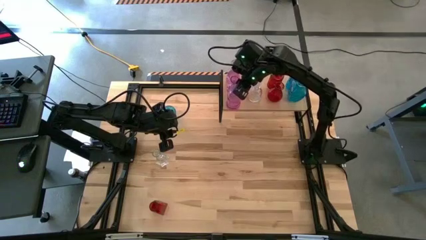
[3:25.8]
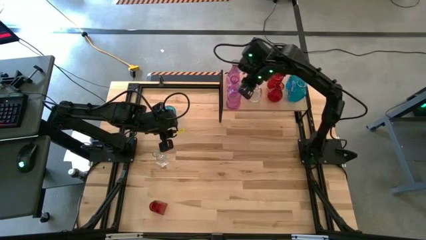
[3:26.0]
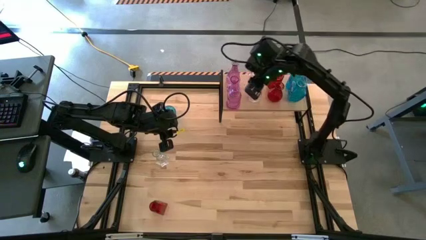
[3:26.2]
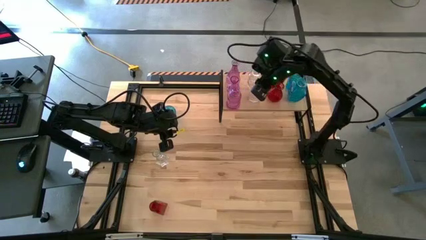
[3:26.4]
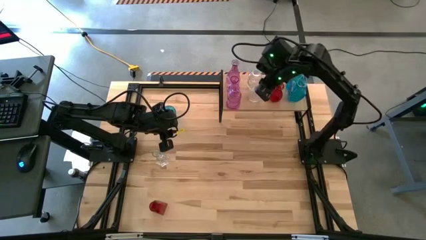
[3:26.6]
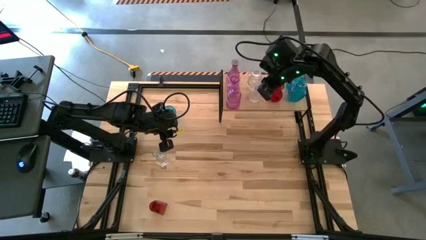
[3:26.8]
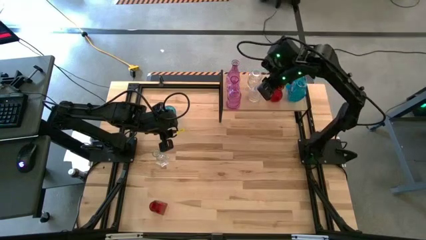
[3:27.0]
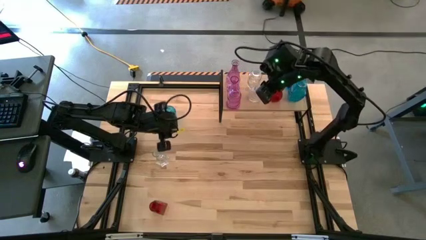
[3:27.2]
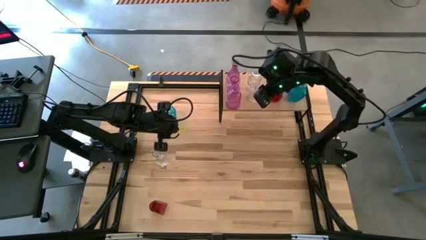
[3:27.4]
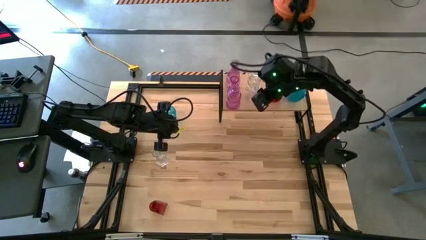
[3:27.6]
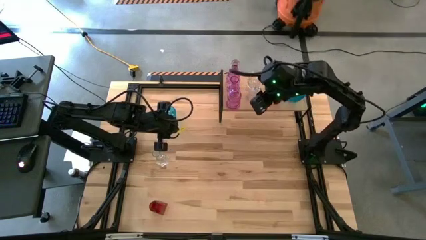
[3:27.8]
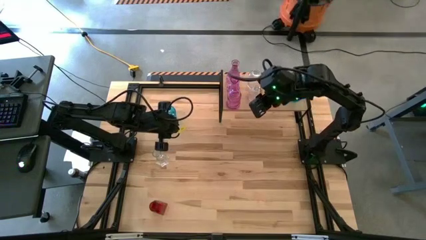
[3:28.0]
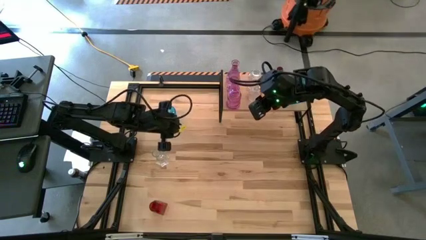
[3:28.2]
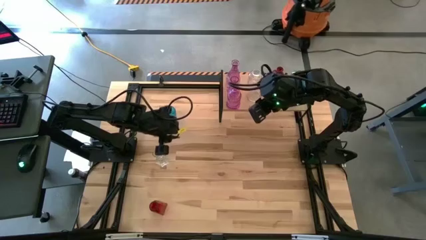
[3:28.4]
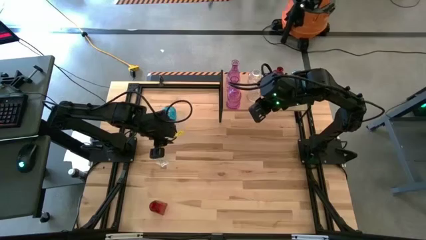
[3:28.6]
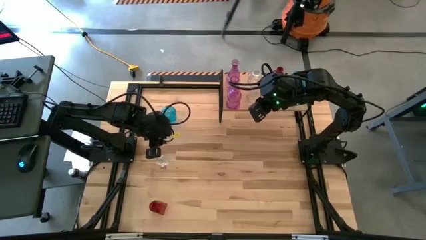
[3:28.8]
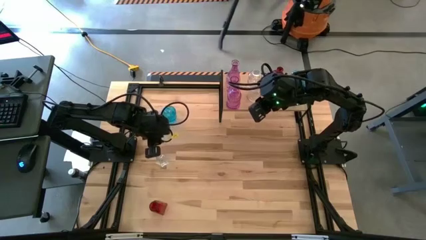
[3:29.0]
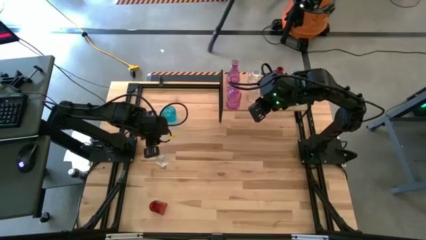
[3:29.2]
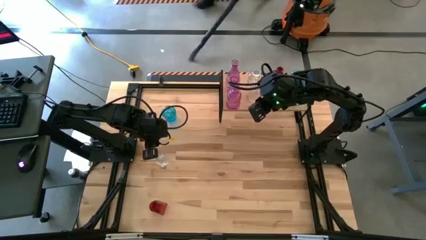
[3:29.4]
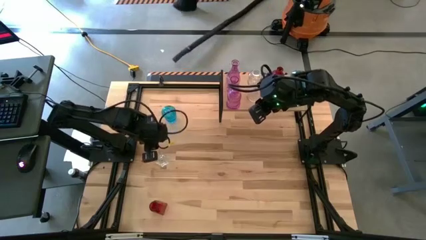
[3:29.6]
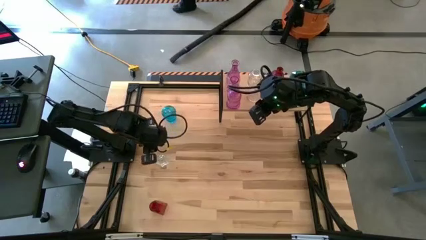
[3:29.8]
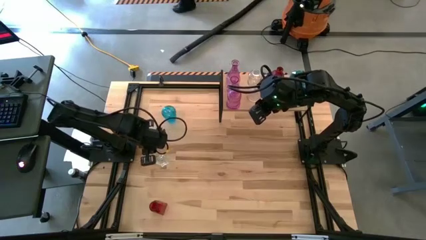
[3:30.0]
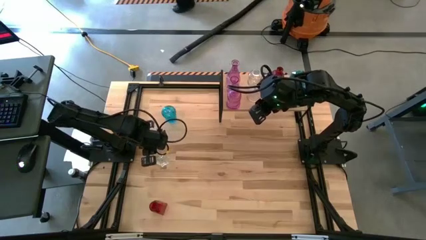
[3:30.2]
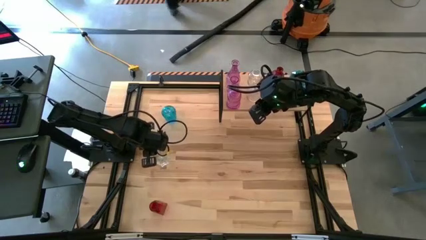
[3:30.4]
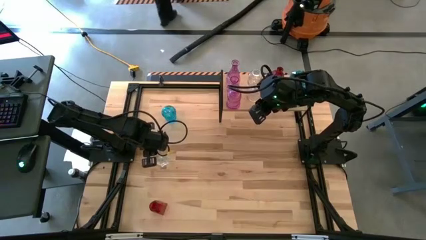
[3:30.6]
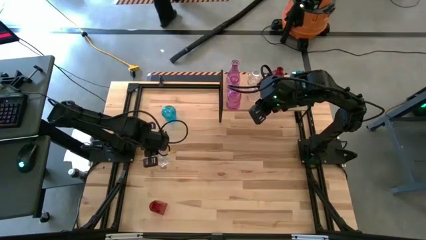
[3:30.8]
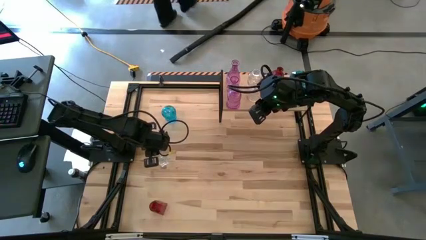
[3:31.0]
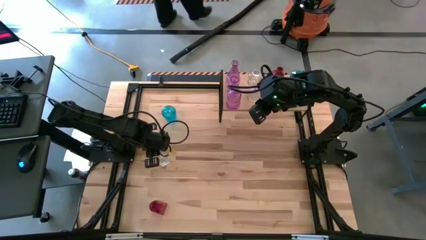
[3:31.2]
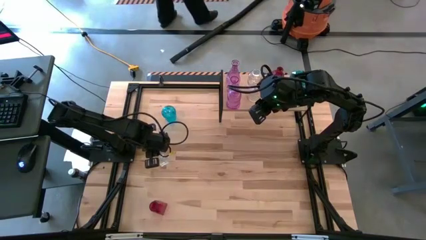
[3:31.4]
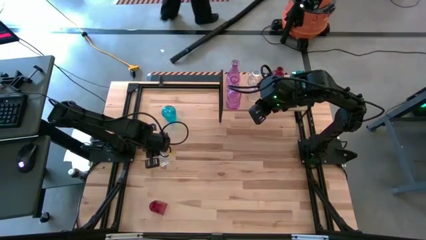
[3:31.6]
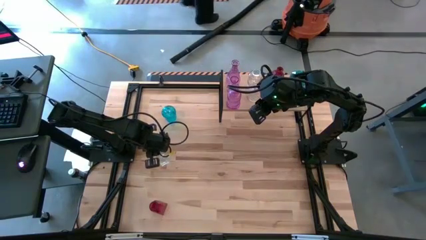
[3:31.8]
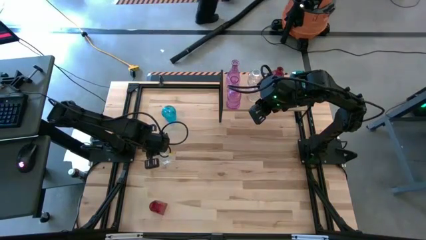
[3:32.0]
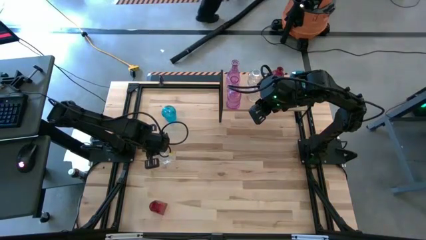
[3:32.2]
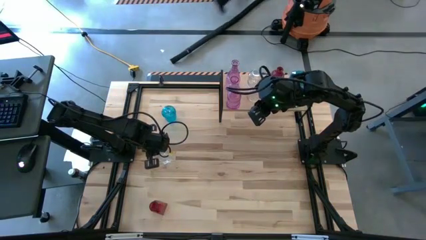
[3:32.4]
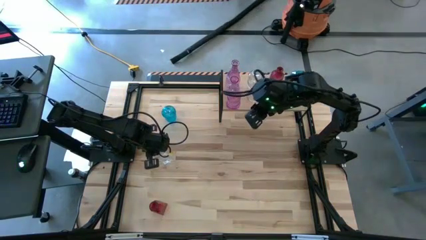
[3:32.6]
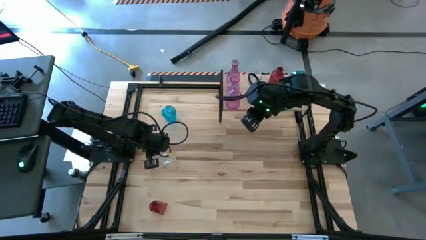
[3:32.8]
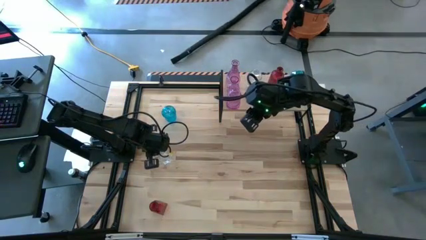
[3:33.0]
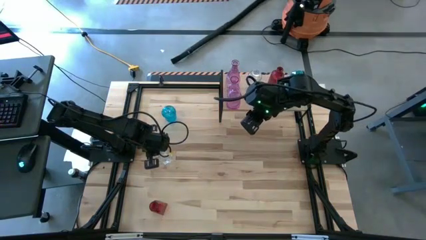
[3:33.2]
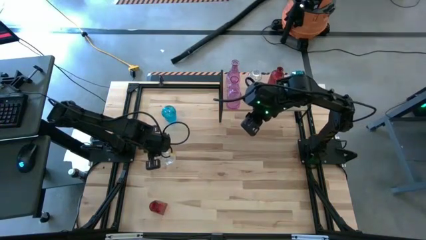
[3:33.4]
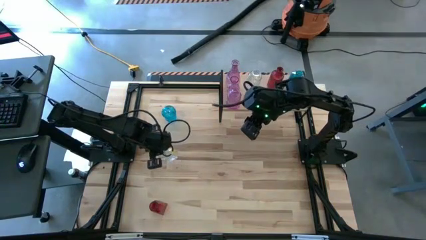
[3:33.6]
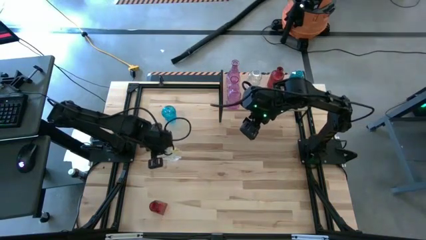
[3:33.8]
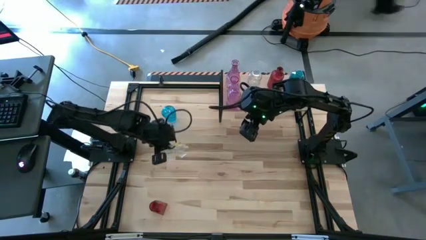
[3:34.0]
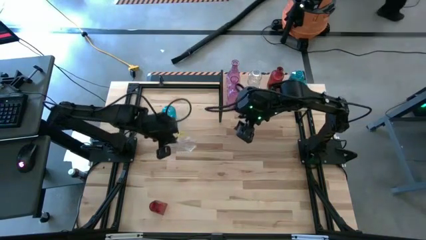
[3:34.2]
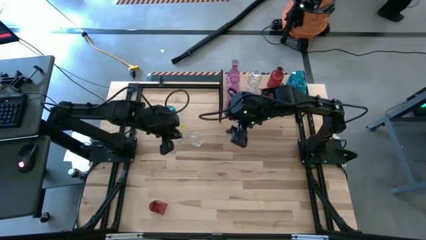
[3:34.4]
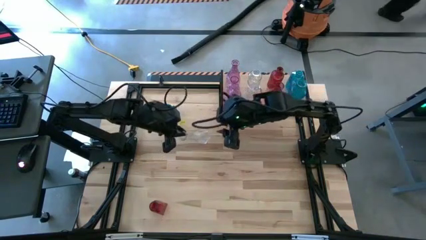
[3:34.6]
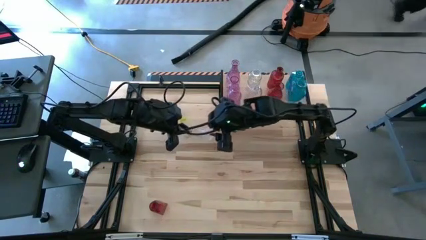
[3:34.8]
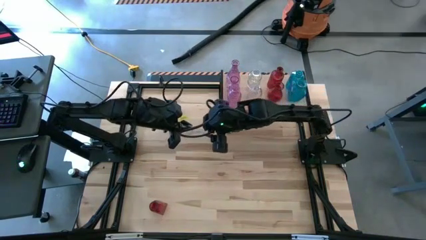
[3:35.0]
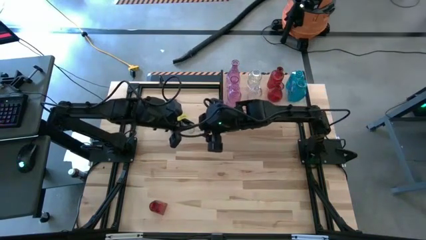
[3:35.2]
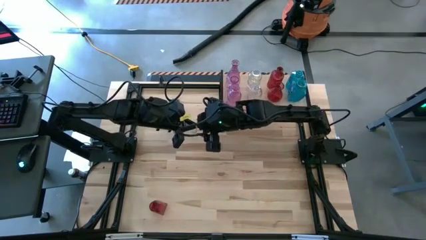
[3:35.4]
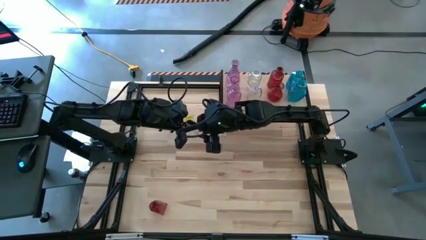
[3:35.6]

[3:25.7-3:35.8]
Task: sort vases onto shelf
Put the transparent vase on the shelf aligned with the other transparent vase

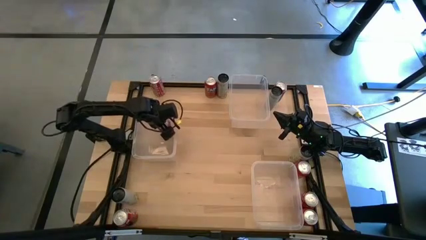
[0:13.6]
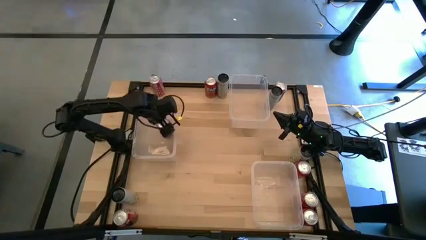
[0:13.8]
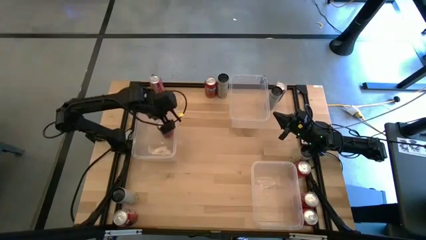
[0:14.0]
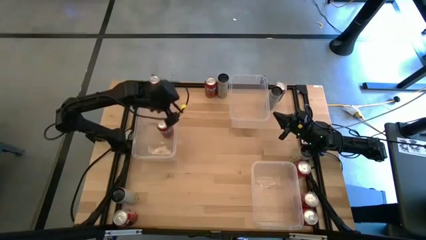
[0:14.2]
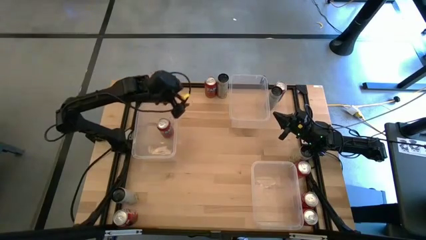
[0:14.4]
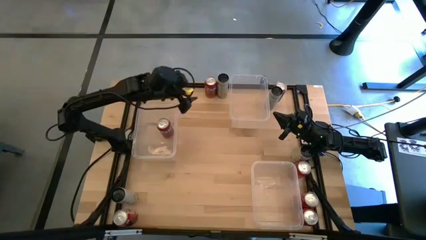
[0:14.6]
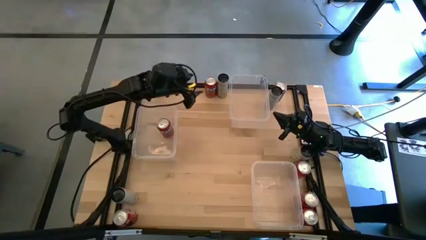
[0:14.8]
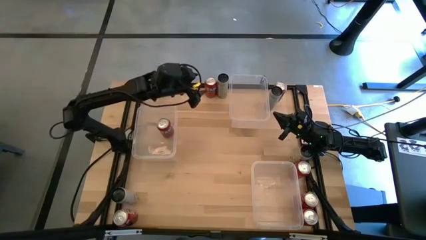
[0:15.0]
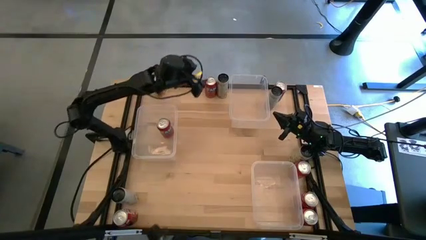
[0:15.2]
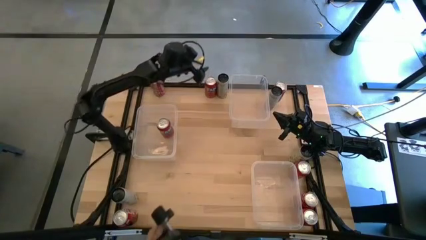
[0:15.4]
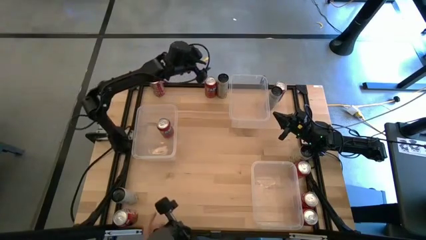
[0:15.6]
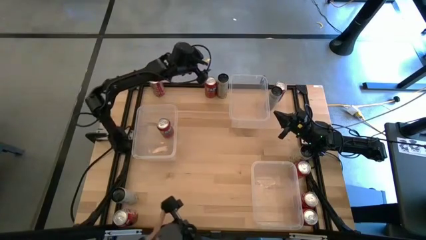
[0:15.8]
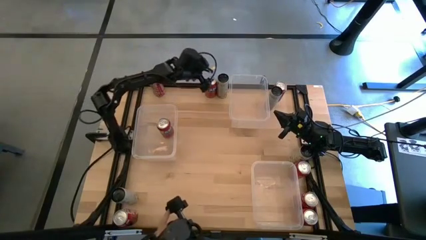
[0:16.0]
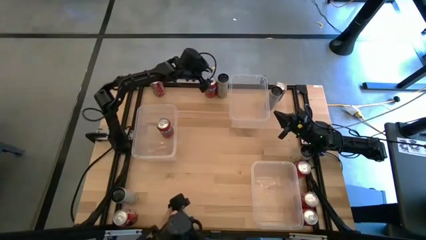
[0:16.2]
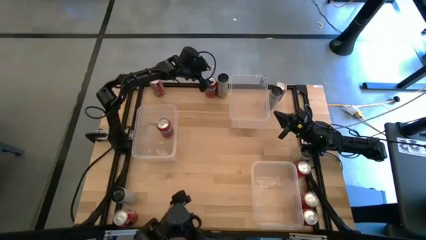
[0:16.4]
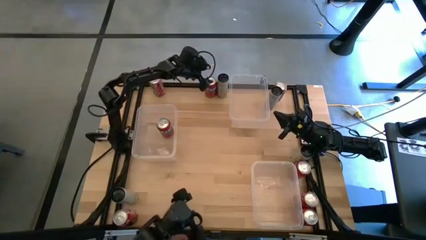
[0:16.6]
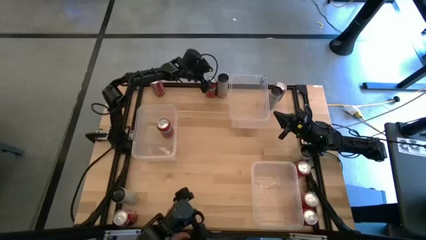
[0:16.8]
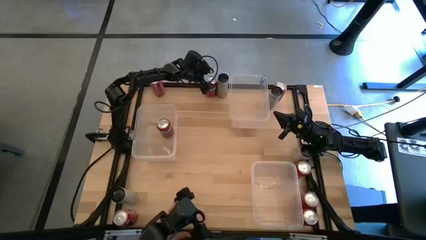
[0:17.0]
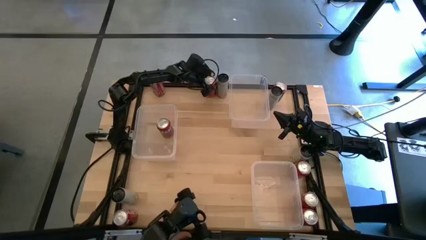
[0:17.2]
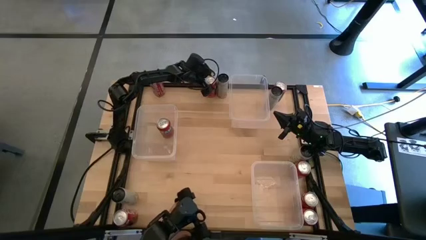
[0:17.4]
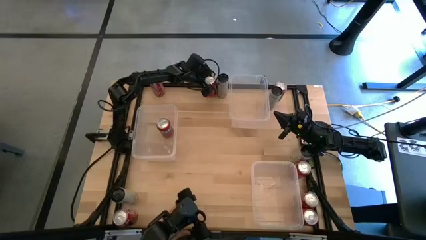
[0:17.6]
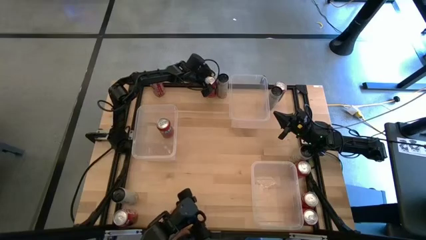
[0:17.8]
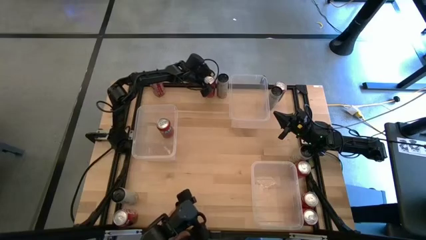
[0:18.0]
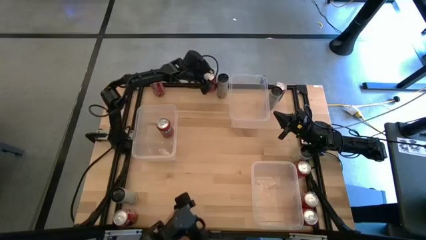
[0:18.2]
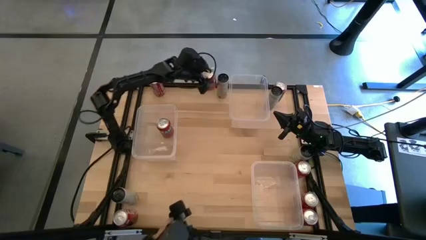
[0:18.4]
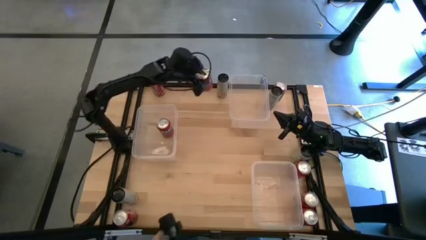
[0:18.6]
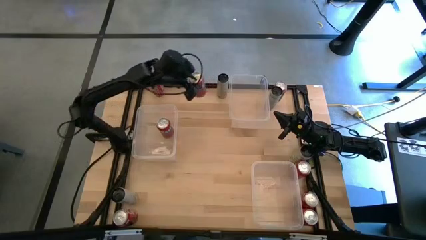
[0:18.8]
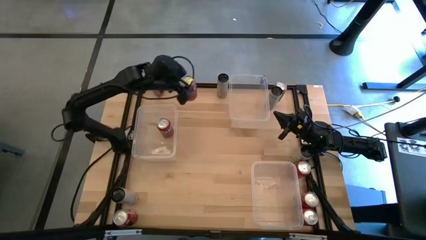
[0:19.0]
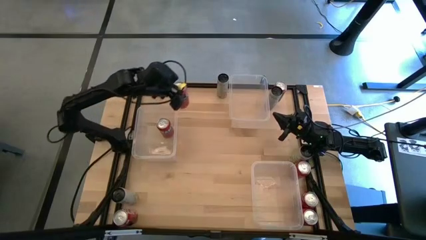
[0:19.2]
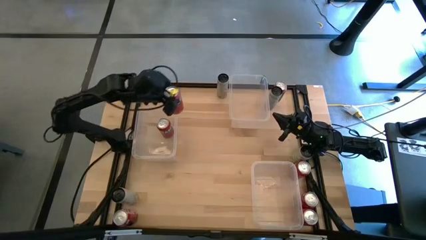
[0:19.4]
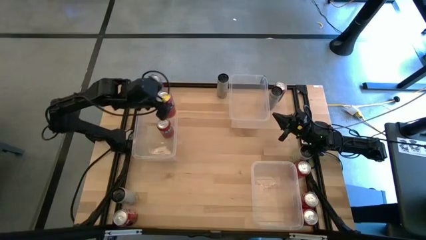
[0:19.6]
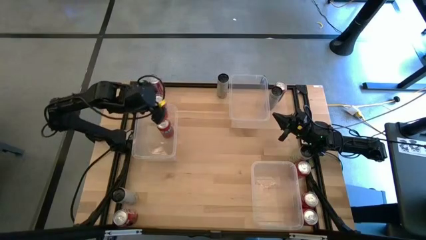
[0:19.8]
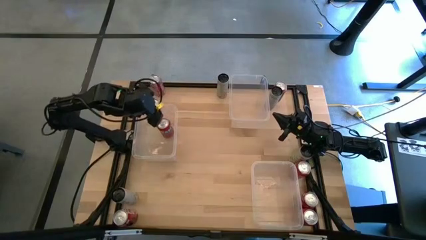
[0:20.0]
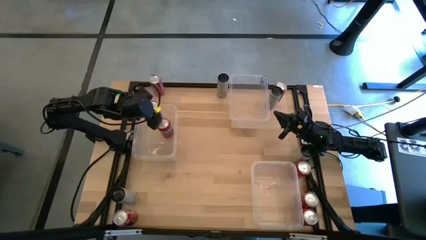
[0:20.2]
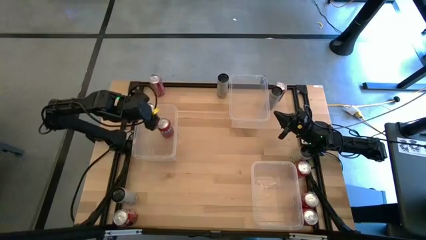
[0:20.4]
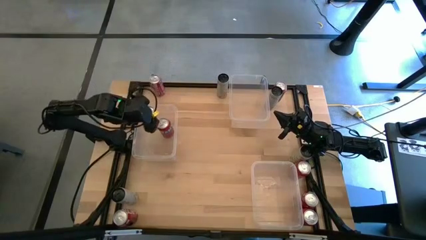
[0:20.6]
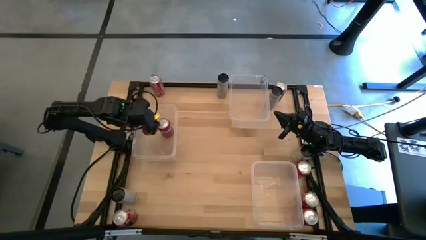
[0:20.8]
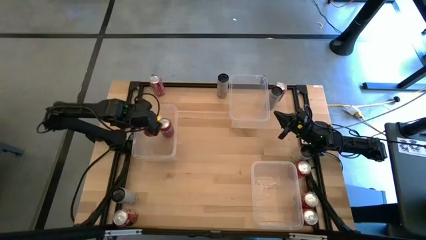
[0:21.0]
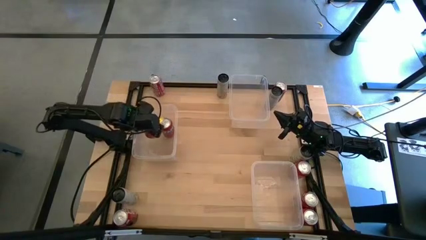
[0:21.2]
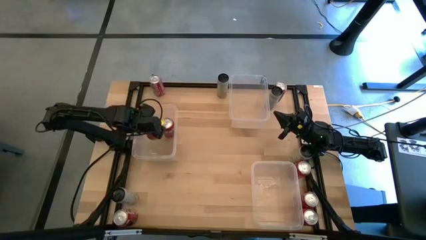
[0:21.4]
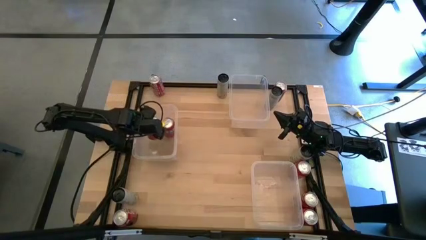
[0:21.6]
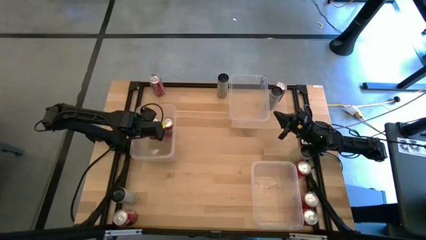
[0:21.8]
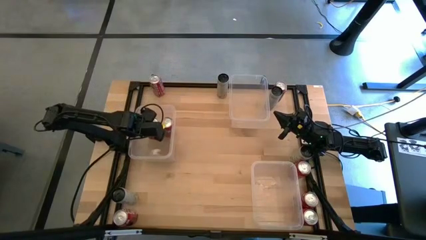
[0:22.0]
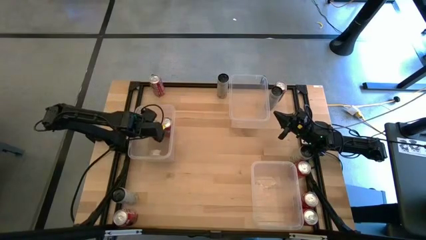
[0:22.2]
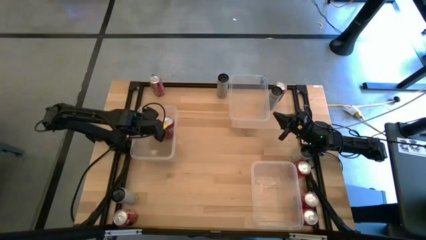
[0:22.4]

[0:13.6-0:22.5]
Task: Sort soda cans
Put the red soda can into the middle transparent bin
